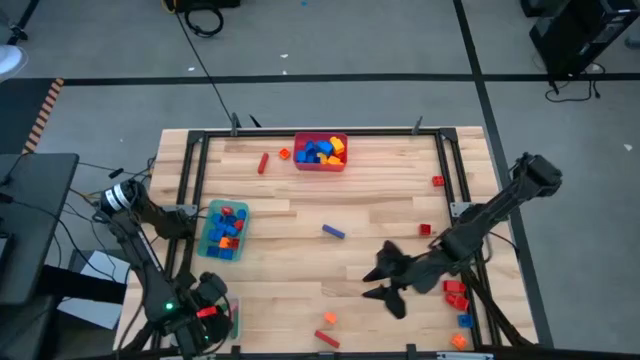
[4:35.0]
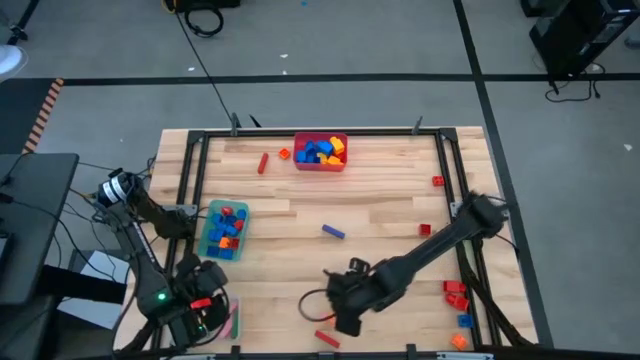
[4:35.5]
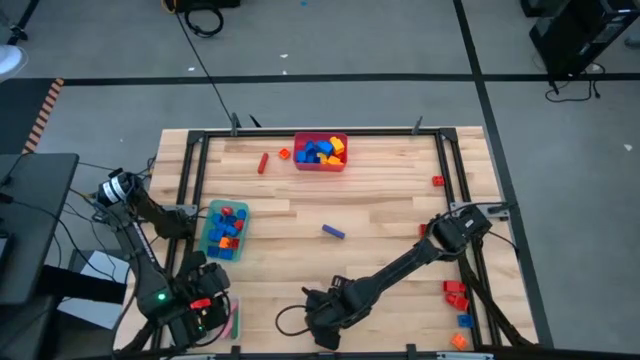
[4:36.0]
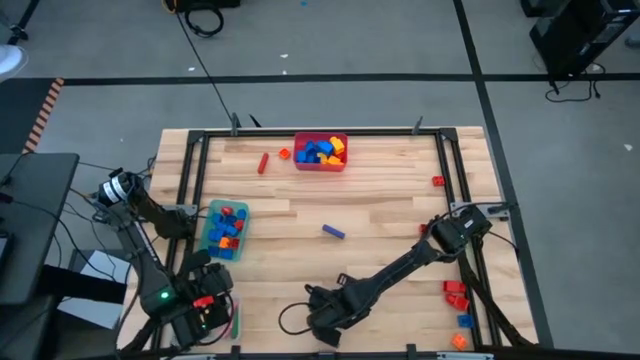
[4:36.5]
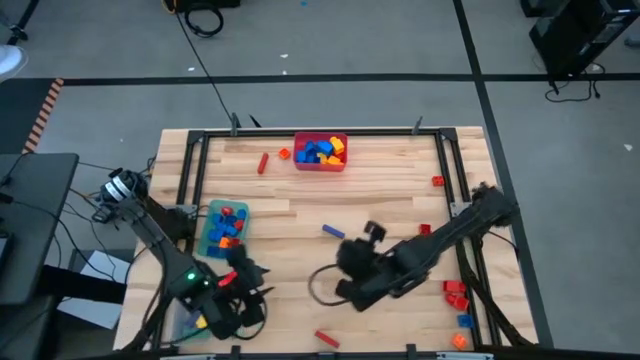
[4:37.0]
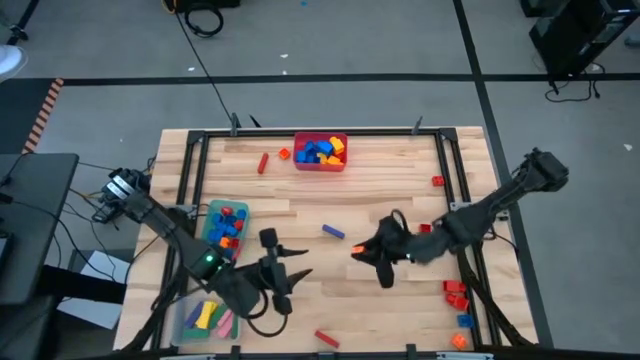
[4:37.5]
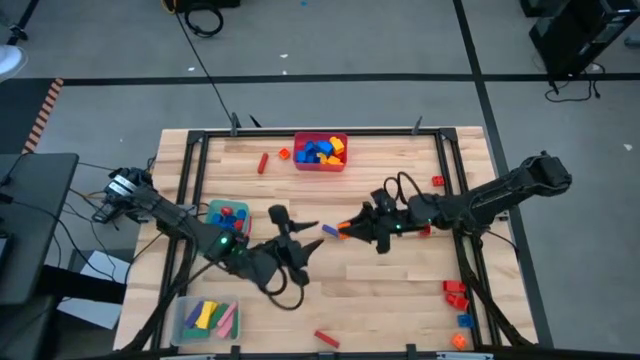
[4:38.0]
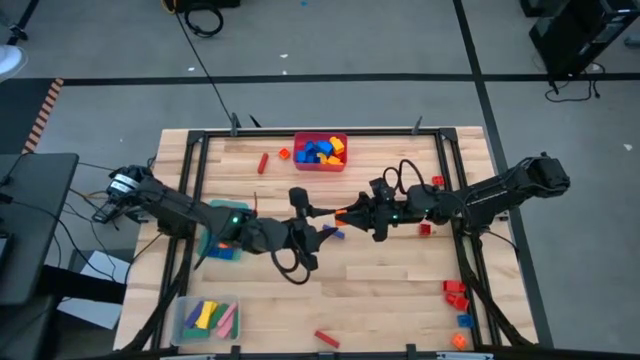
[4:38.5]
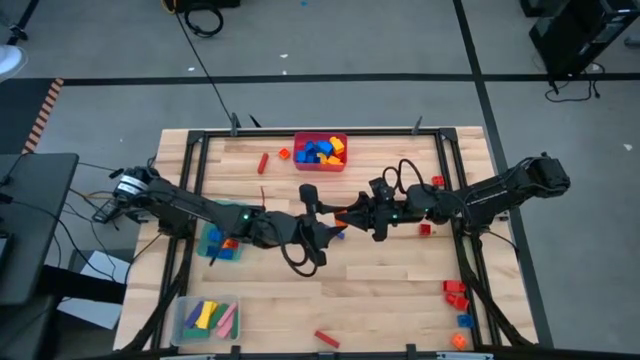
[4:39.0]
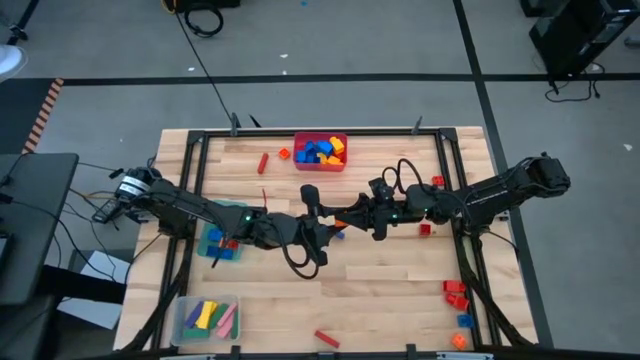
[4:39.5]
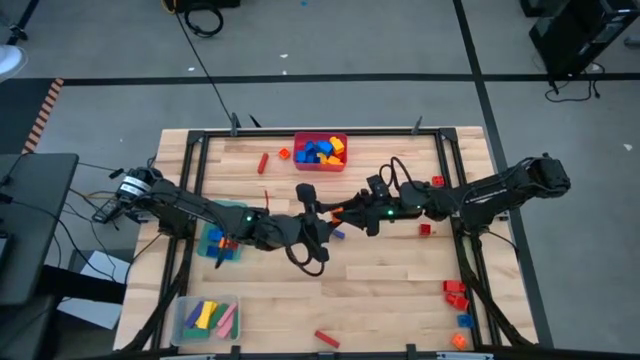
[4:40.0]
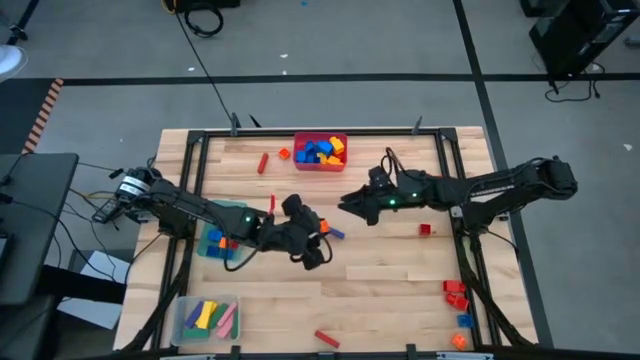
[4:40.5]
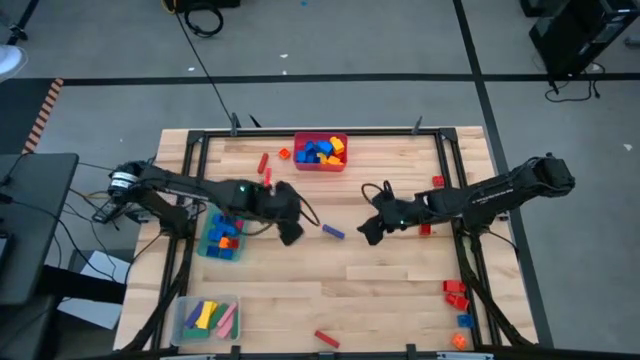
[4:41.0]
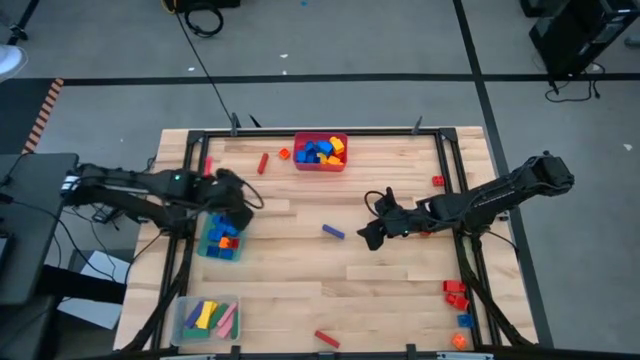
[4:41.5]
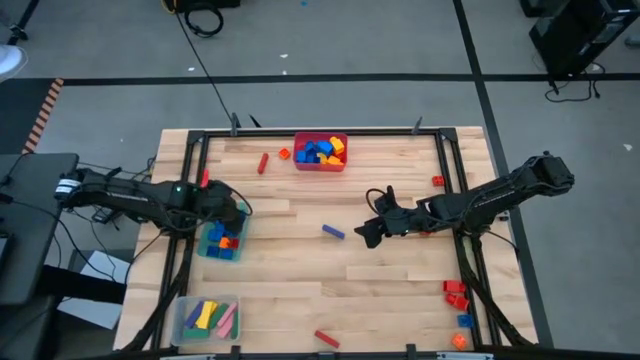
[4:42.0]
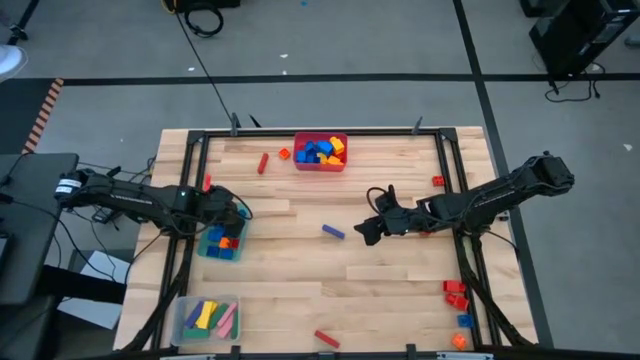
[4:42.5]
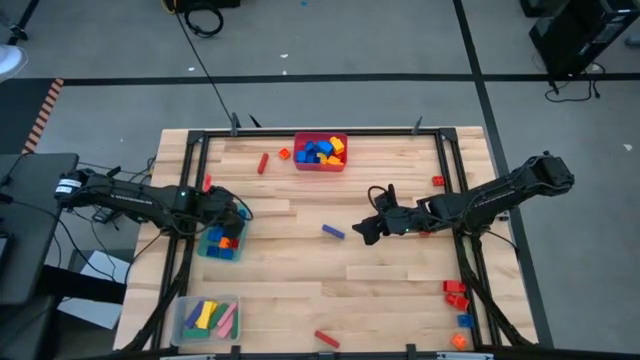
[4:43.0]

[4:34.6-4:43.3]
Task: Sort blocks by size
Put the orange 4 studded building block into the teal bin

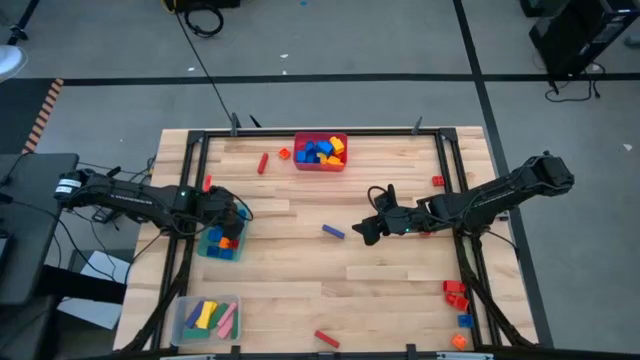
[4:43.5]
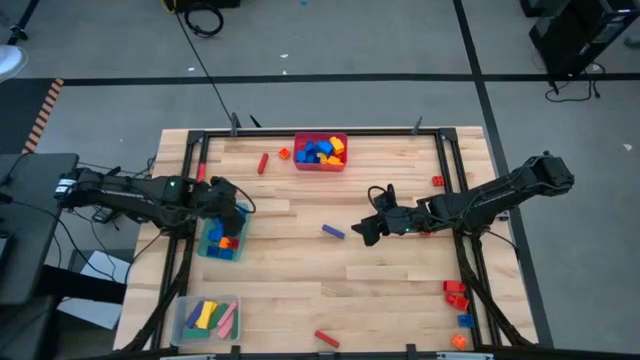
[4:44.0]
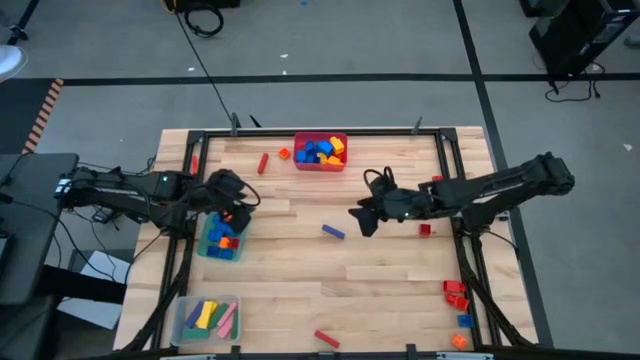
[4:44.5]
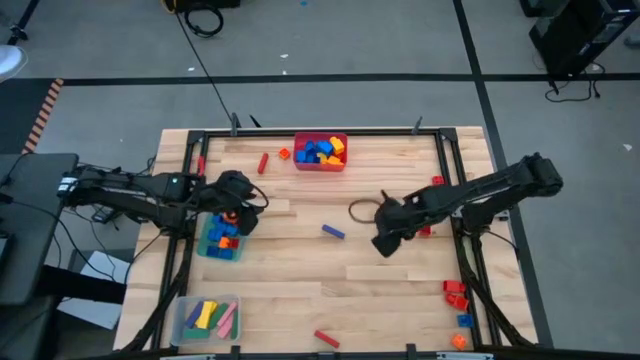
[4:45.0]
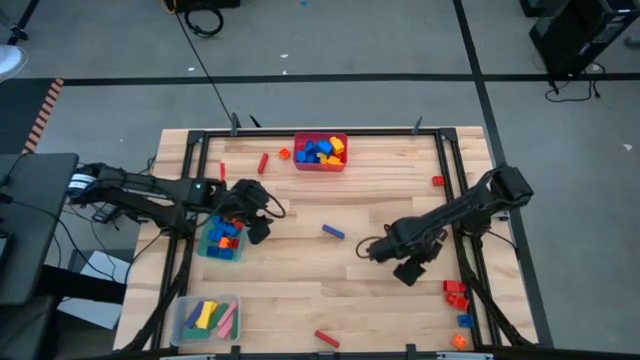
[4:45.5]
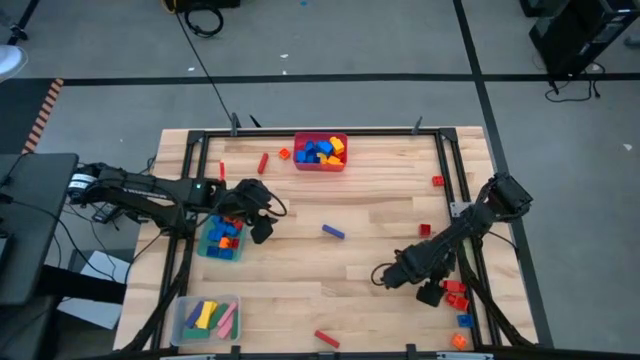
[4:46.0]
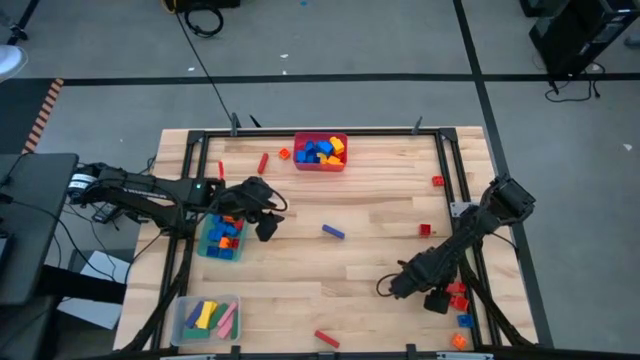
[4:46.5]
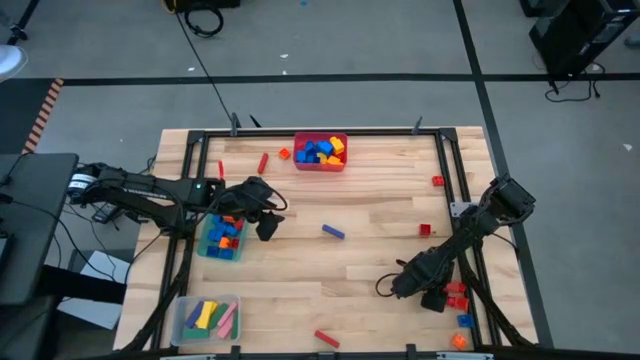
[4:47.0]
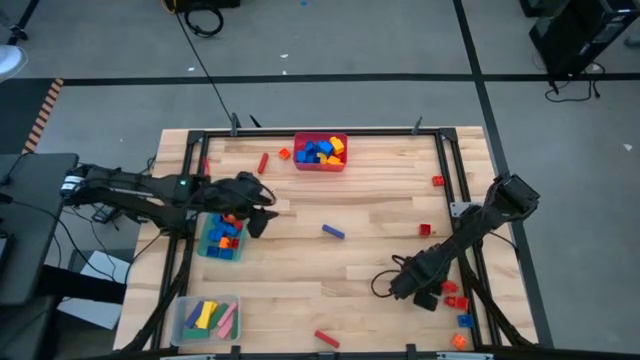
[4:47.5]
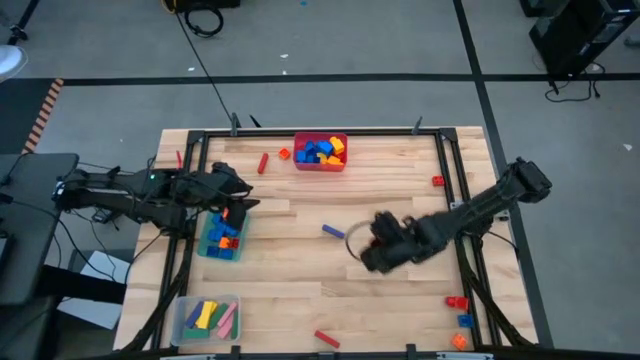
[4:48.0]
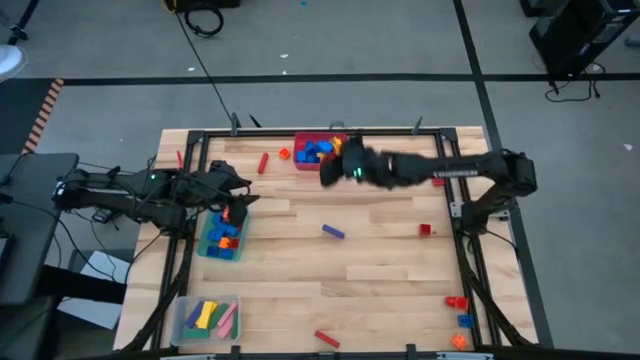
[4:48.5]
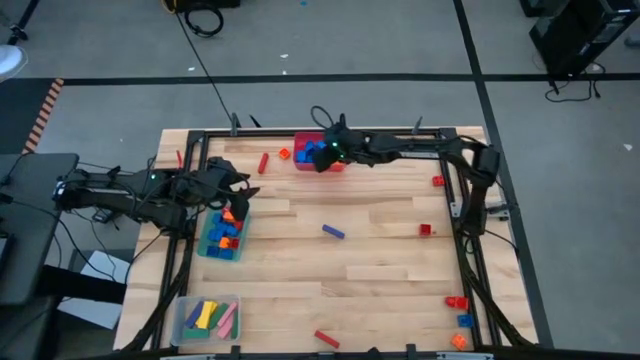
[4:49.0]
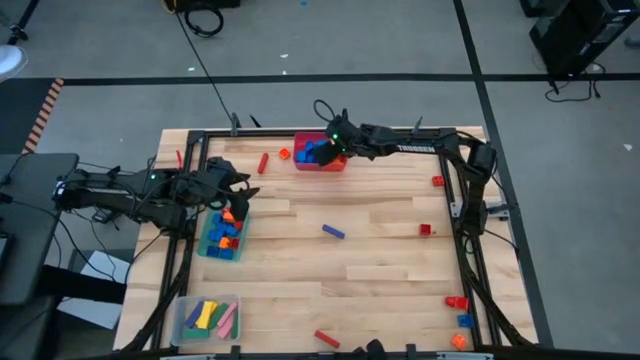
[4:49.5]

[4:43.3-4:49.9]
Put the red 1 studded building block into the red bin

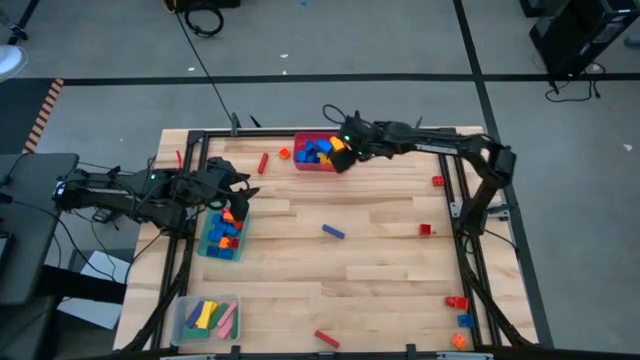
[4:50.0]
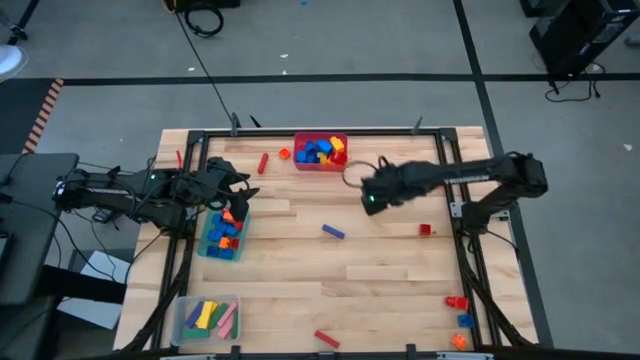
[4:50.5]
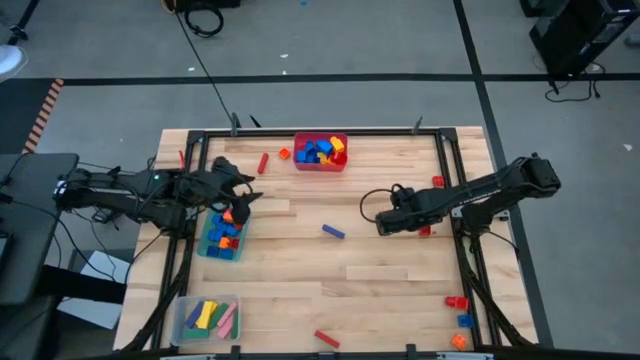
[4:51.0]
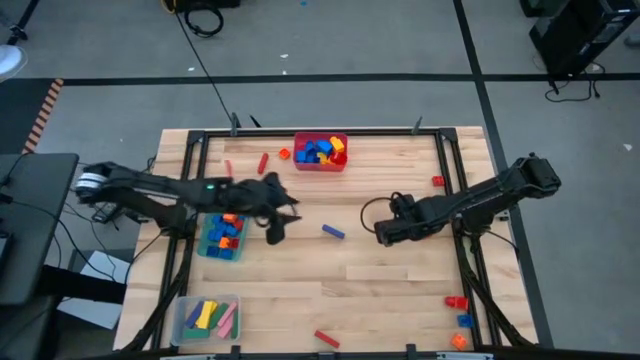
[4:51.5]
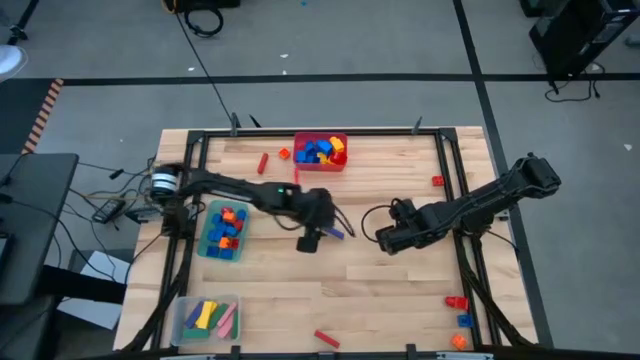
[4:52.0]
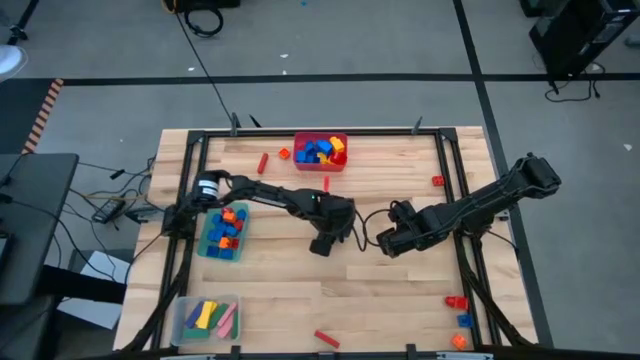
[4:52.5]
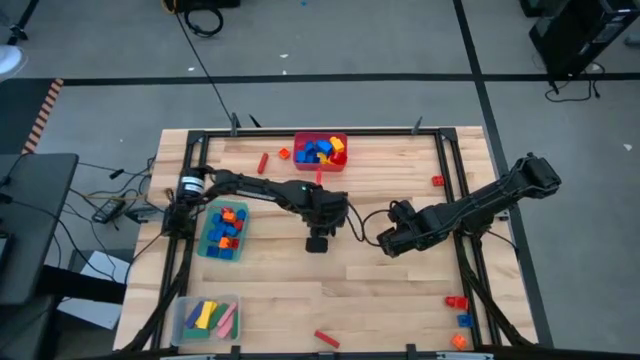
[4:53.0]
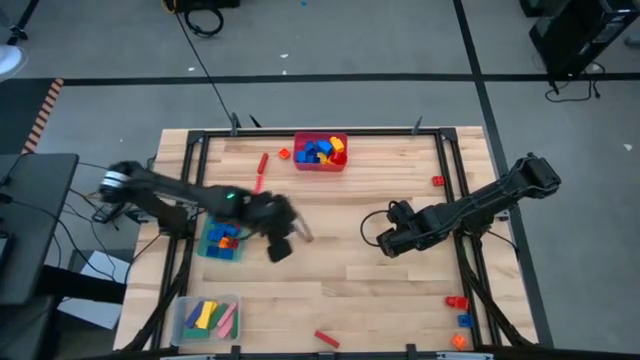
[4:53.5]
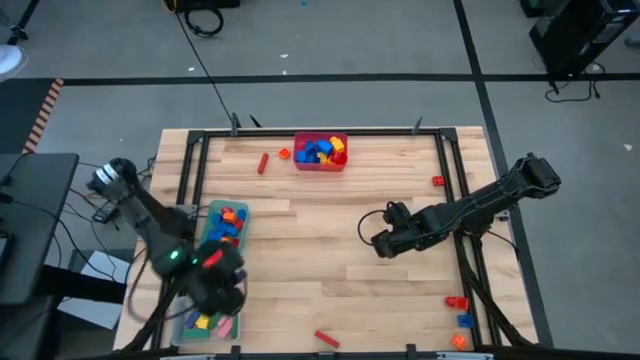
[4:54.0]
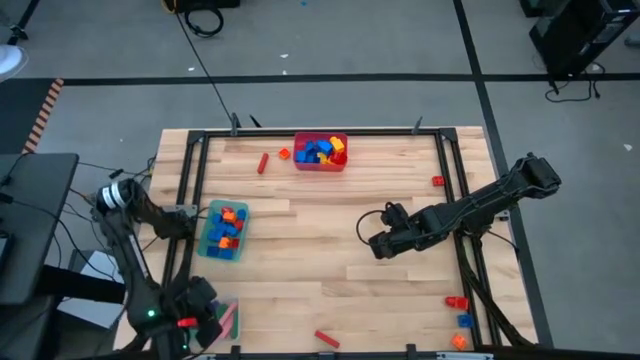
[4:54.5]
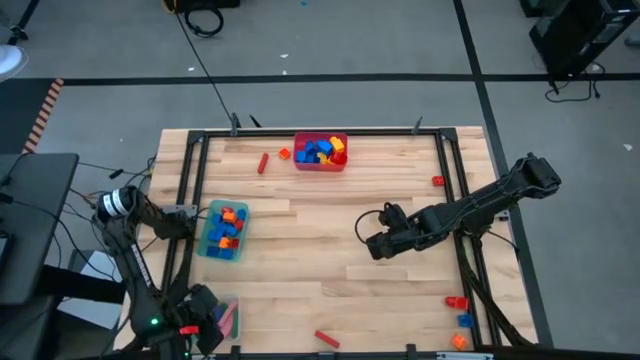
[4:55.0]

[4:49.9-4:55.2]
Put the blue rectangle block into the transparent bin

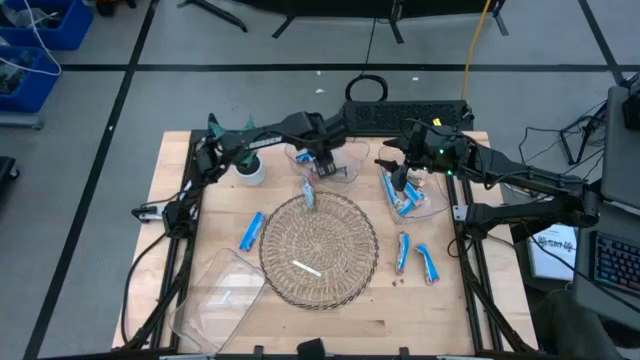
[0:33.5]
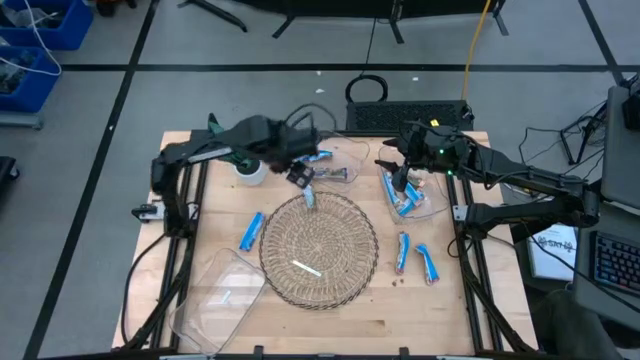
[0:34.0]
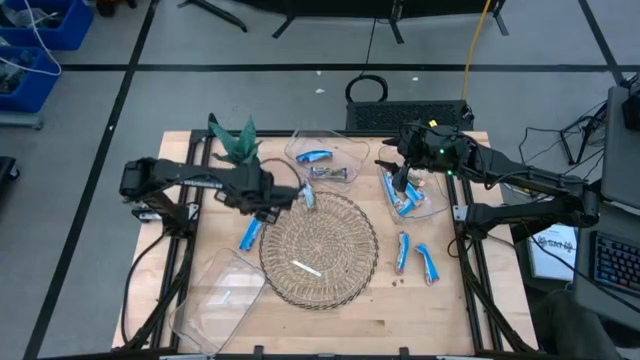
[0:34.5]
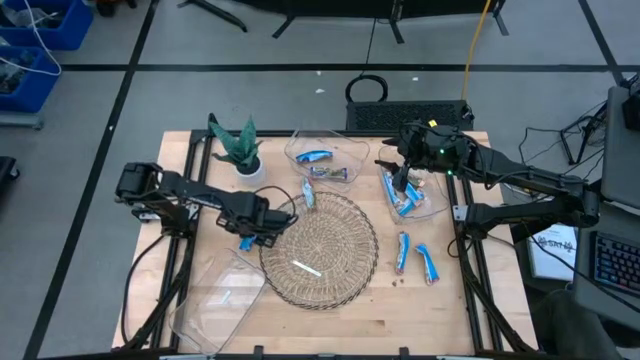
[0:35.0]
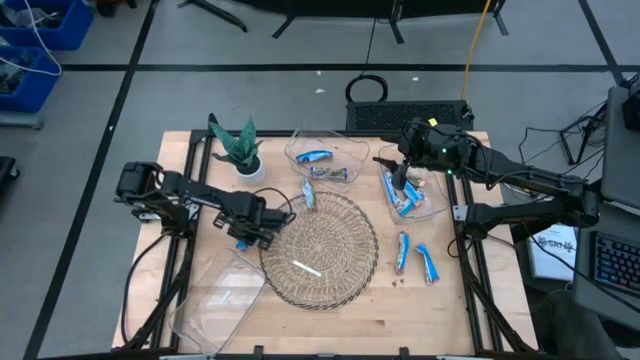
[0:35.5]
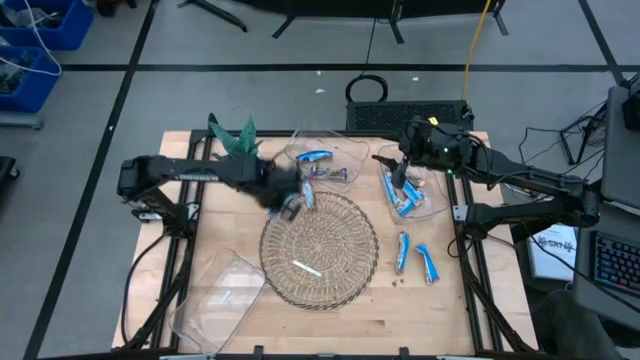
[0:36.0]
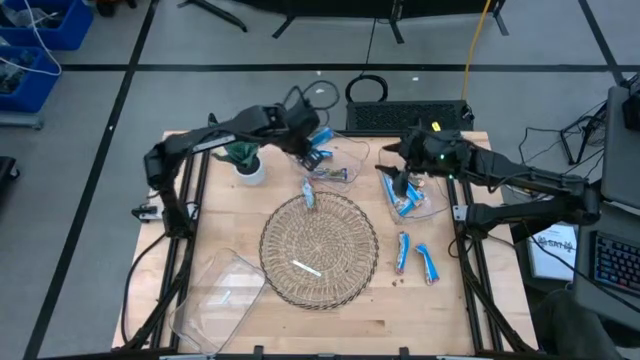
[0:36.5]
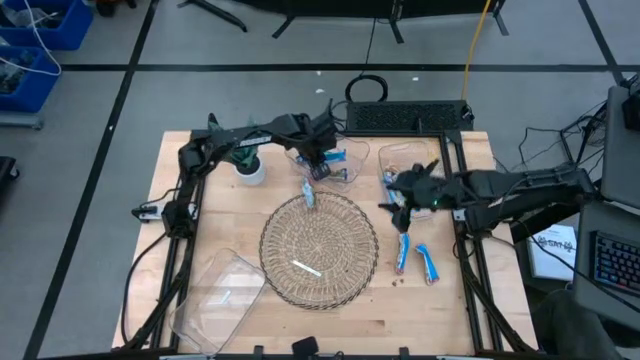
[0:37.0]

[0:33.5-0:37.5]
Task: Pick and place Granola Bars by type
Put the blue granola bar into the top left transparent bin
